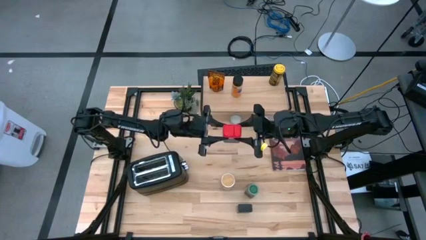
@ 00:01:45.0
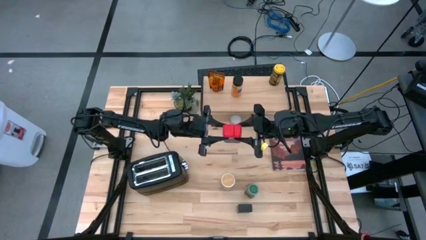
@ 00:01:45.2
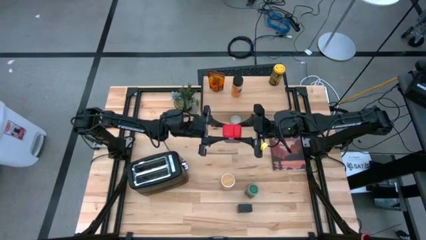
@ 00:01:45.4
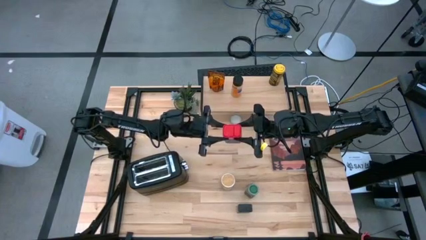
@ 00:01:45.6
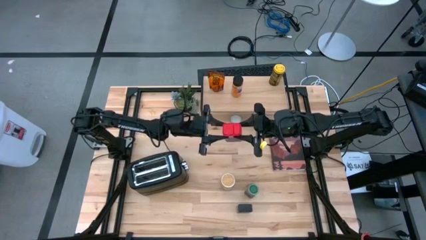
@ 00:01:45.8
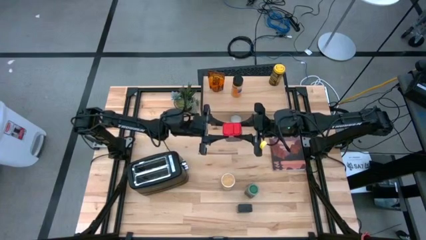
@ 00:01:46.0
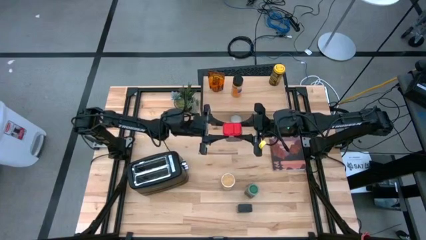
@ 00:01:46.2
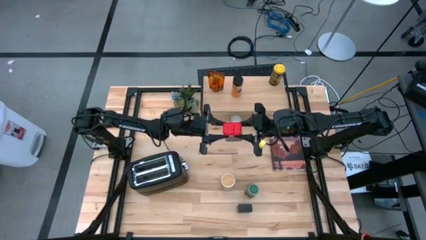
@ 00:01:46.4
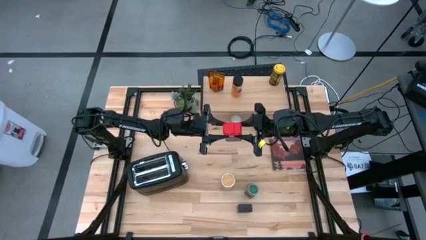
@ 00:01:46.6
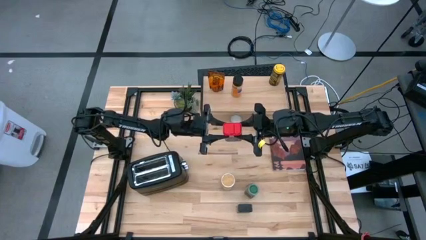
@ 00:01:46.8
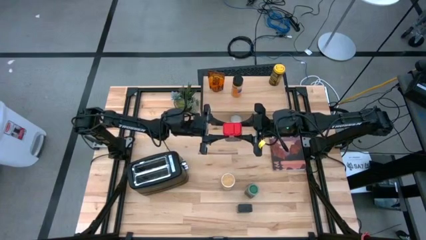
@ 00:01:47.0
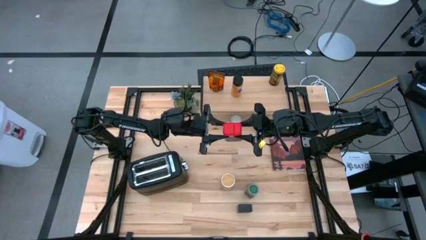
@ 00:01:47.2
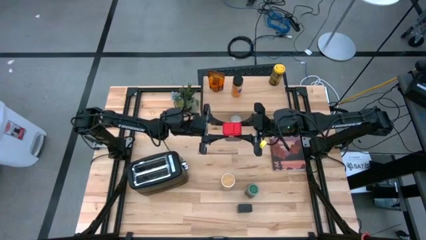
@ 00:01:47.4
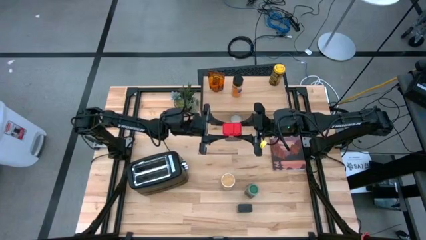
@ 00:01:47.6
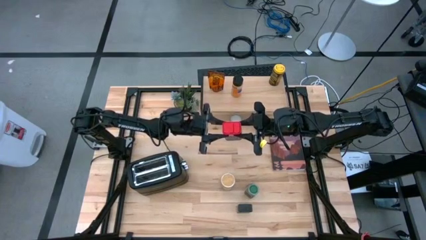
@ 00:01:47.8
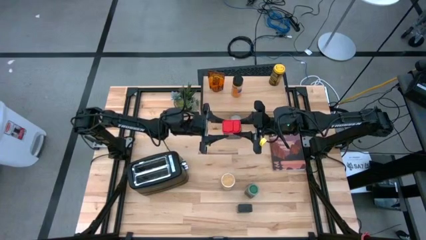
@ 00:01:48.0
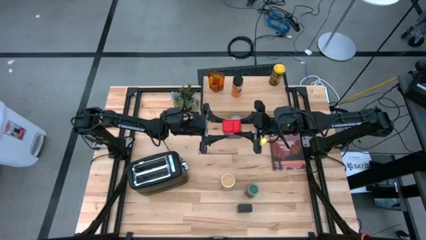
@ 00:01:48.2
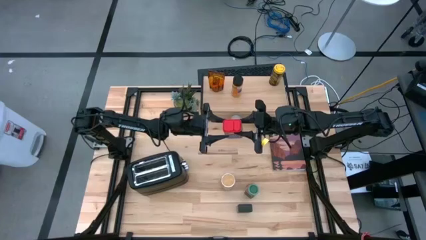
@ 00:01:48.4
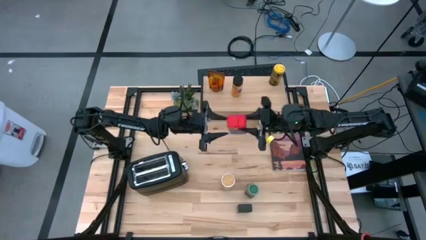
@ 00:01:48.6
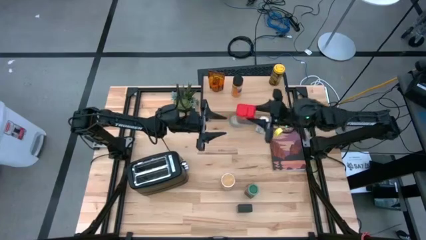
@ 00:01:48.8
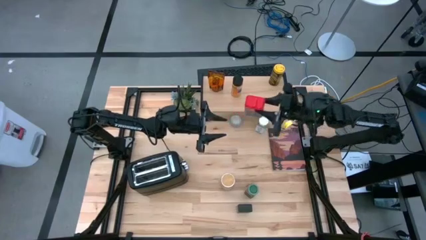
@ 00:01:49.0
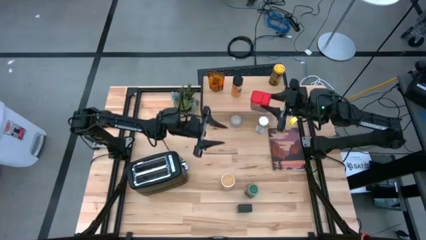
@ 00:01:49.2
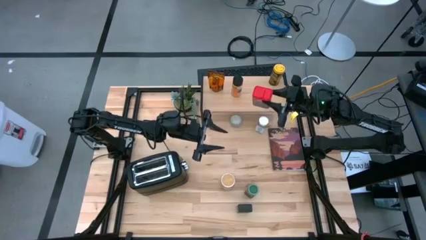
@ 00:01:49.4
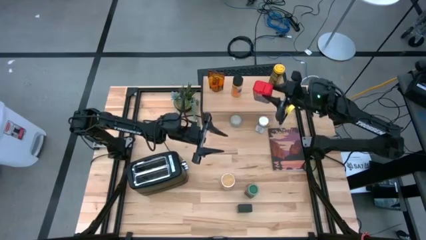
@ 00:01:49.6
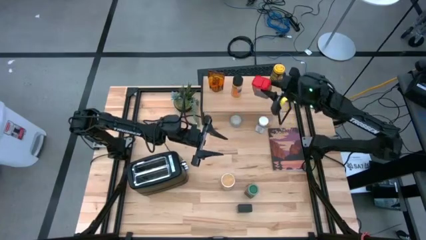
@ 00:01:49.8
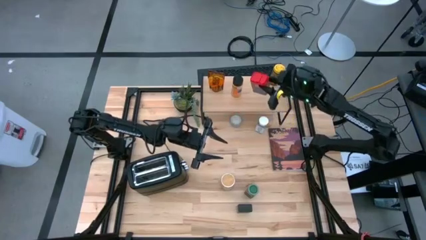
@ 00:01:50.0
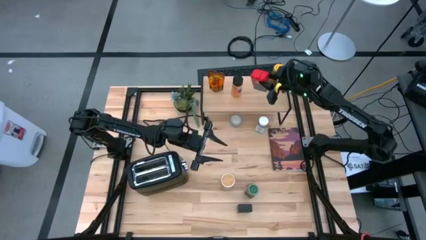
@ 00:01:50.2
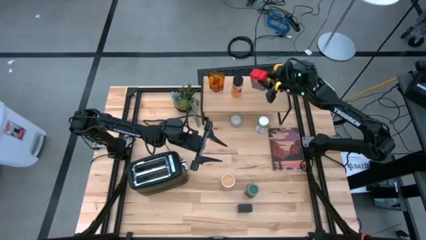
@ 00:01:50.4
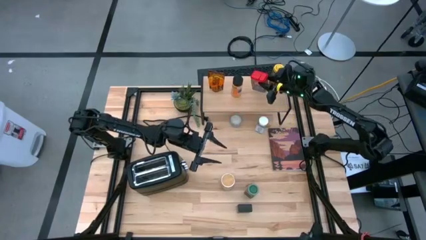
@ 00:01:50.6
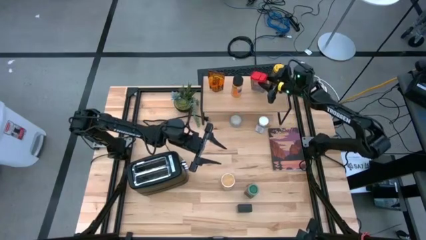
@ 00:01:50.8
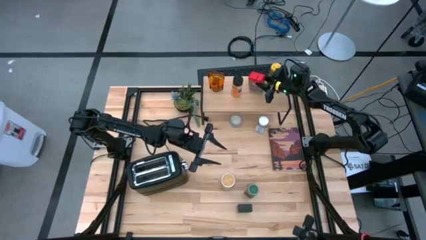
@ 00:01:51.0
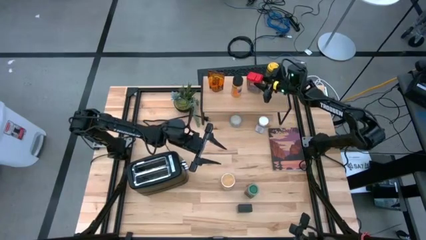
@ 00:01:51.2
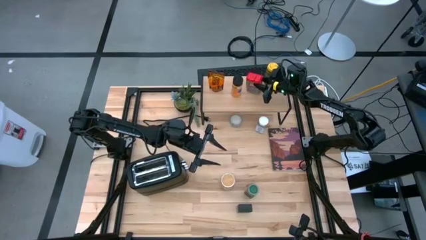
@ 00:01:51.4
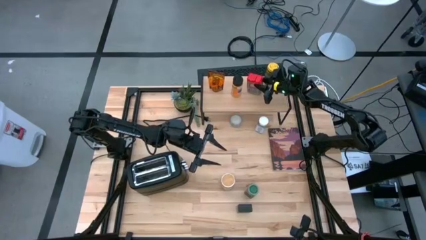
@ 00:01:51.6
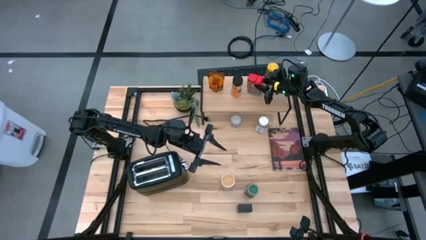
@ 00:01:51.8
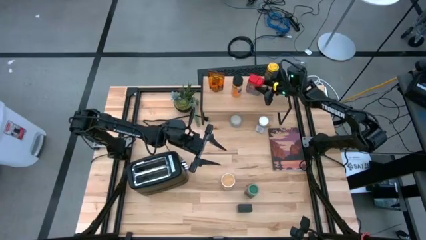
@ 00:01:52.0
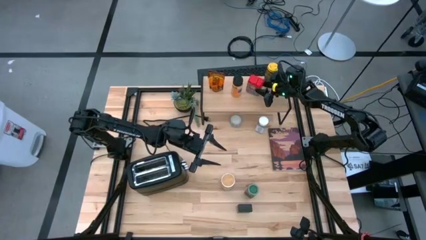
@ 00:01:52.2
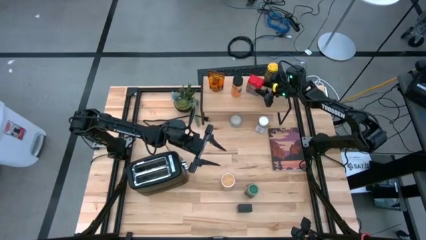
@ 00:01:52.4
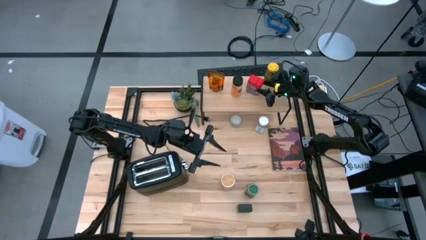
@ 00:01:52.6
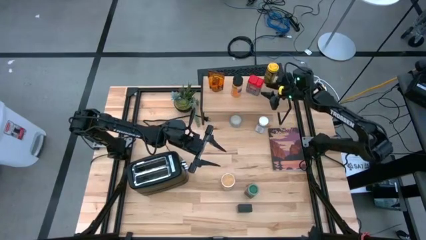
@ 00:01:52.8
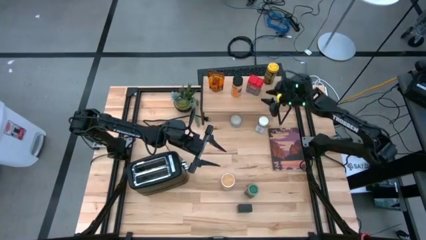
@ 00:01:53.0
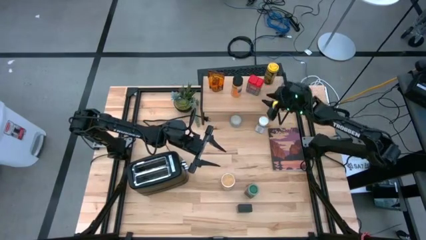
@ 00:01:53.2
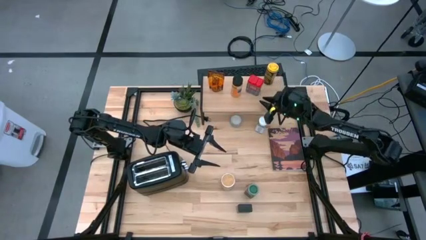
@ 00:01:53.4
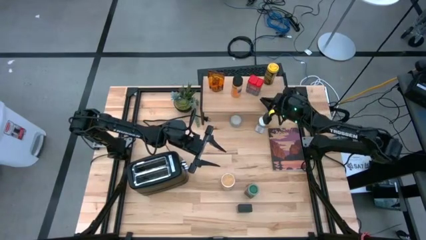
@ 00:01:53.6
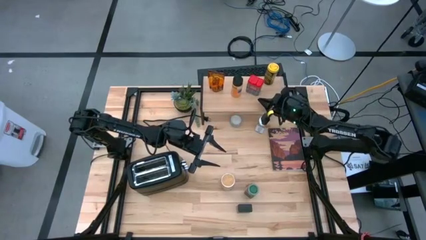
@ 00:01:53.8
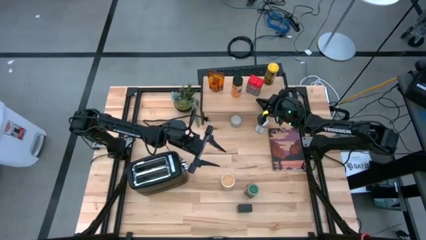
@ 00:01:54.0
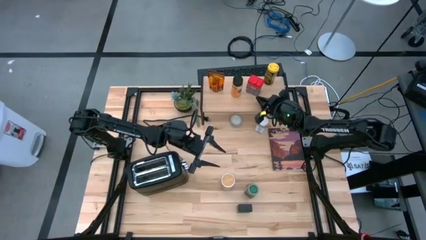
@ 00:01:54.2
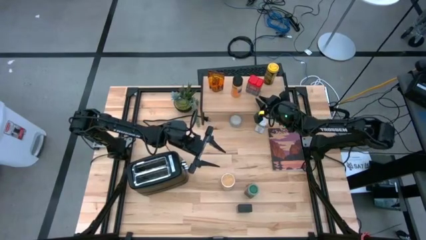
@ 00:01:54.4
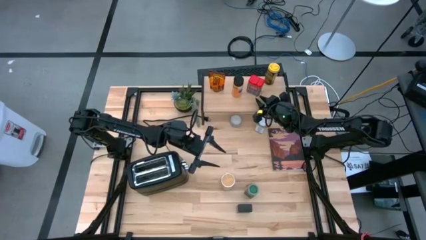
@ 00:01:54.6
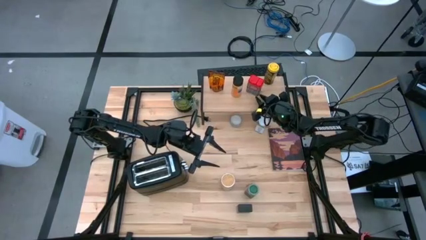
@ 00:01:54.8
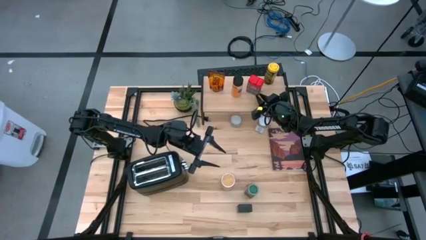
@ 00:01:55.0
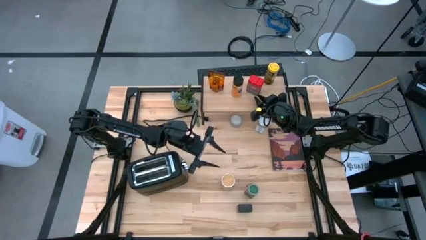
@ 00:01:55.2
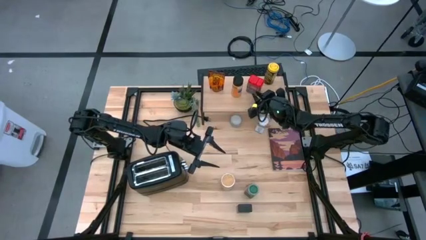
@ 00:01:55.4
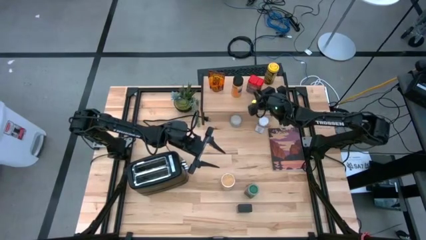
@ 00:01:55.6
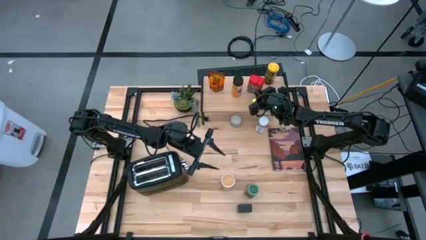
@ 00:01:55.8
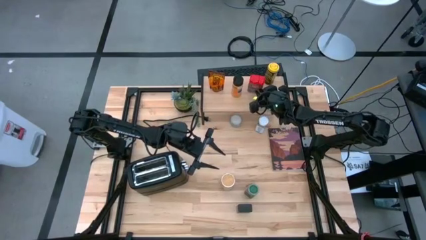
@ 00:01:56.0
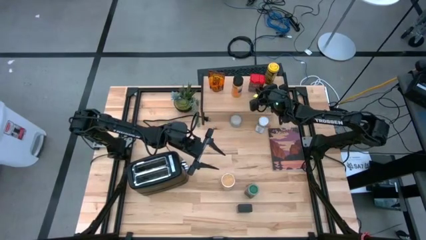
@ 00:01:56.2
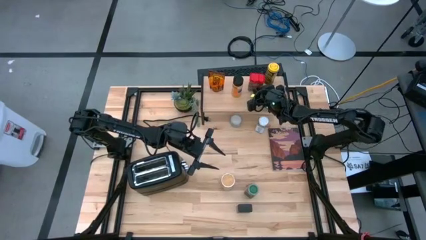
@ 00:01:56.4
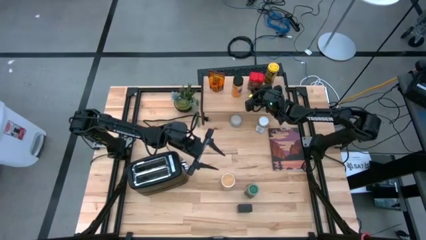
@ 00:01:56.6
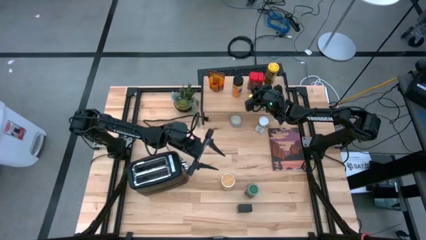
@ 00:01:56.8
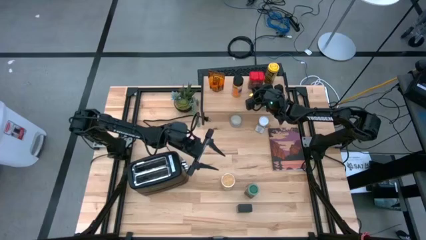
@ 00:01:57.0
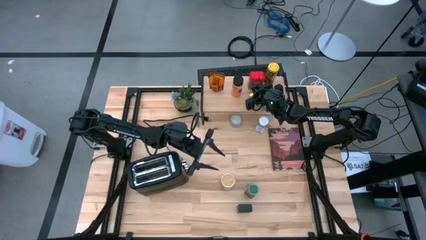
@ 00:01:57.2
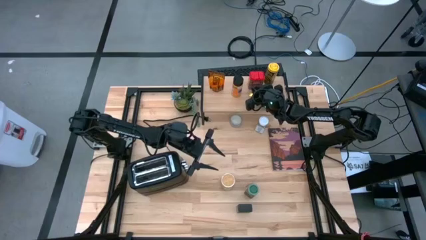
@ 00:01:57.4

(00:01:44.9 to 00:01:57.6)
Task: Shelf spices
Put the red seasoning can on the shelf

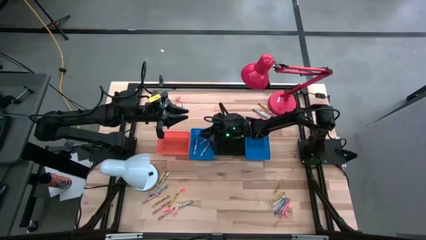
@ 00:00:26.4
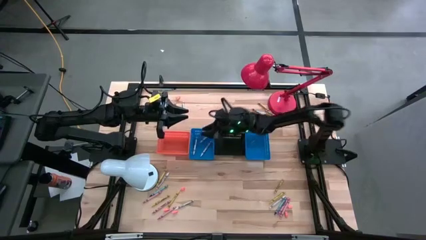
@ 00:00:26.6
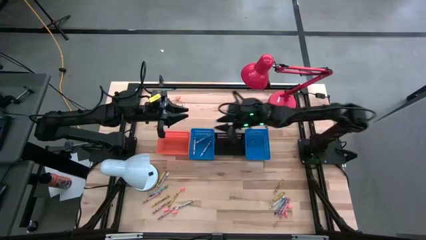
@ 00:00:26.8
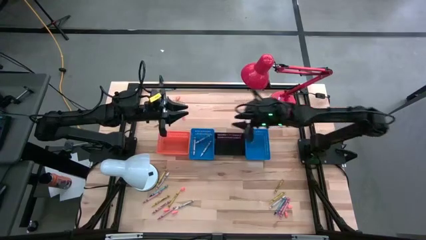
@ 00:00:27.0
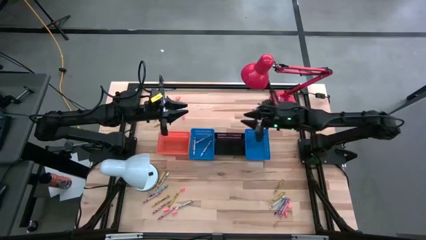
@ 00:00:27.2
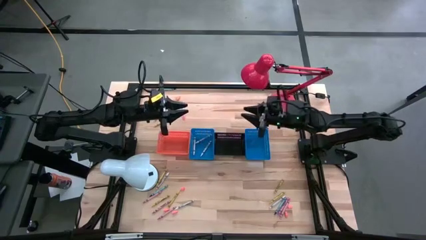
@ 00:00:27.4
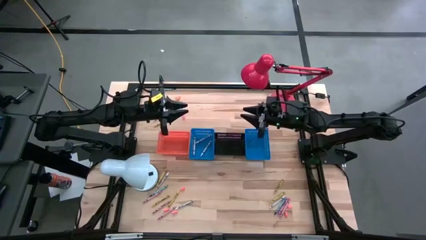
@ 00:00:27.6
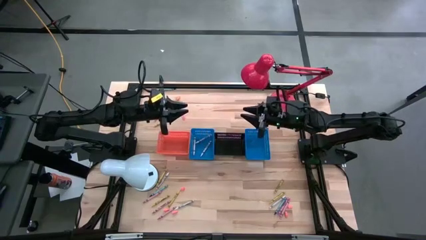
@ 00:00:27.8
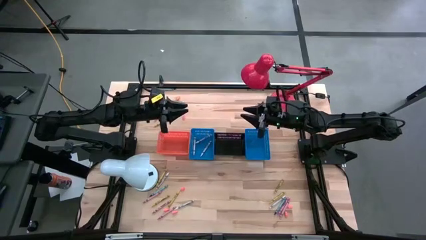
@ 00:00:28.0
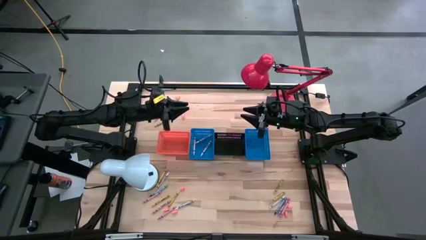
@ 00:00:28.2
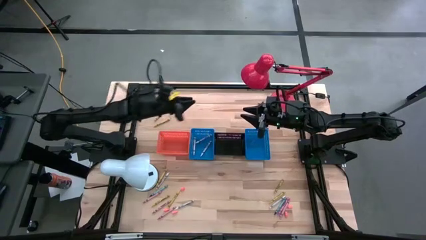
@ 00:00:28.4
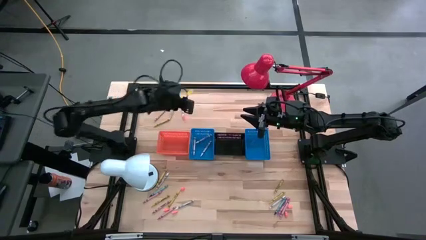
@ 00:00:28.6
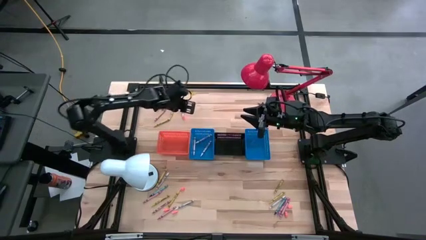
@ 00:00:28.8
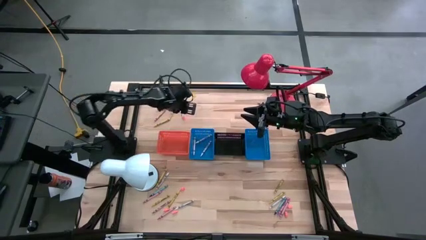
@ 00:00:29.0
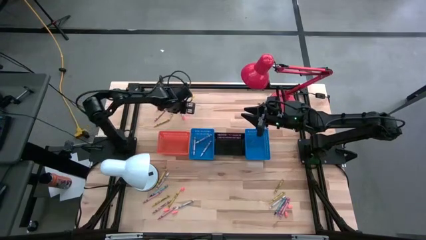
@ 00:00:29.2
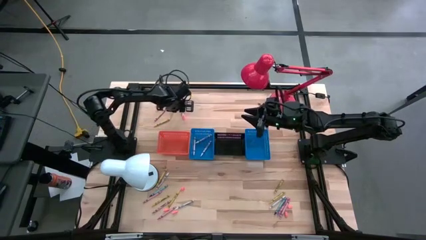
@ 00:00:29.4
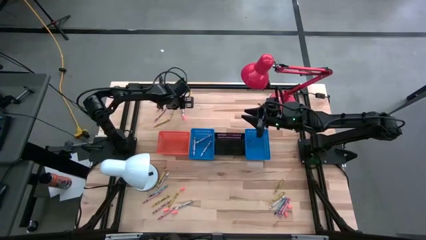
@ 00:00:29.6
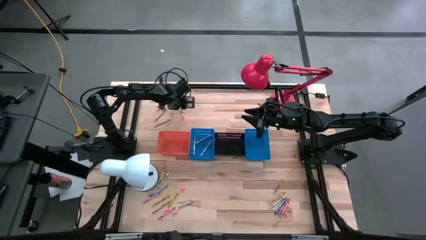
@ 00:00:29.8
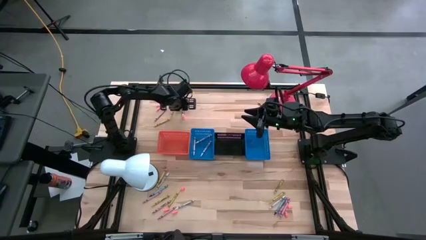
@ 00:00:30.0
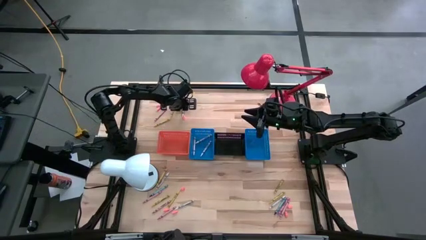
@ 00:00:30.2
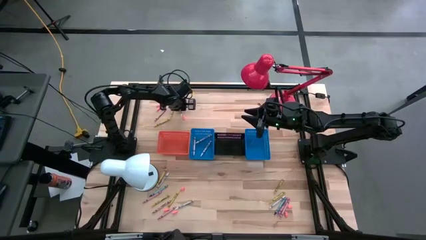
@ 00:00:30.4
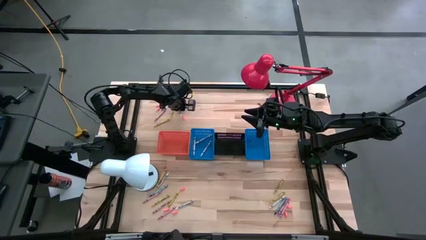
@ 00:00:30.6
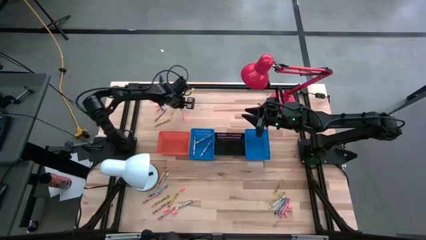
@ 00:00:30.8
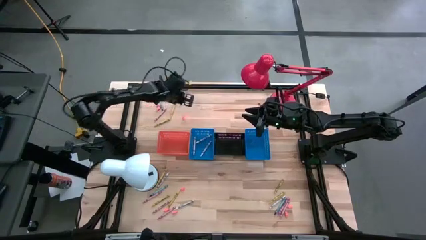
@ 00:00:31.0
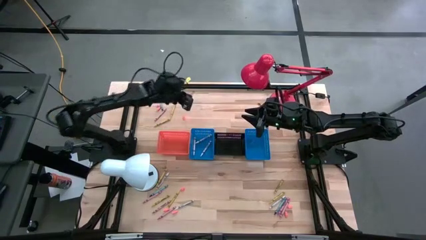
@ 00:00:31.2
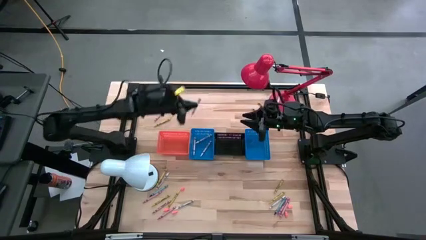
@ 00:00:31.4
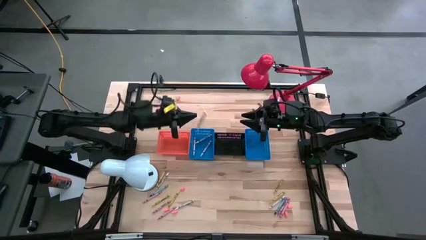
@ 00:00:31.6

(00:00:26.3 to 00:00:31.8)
Task: Sort crayons
Put the white crayon into the left blue bin
